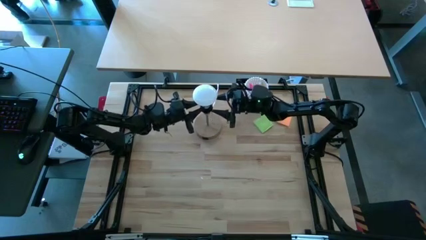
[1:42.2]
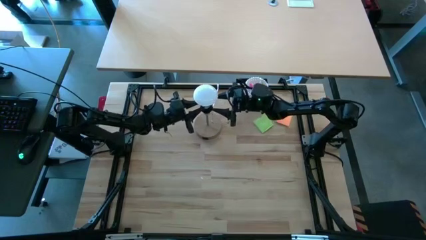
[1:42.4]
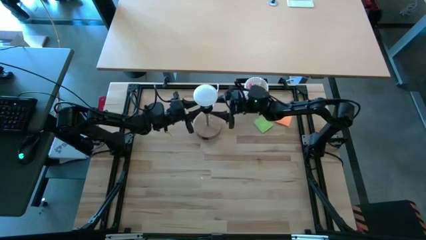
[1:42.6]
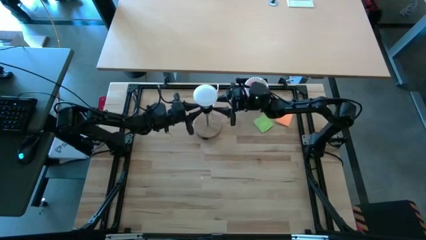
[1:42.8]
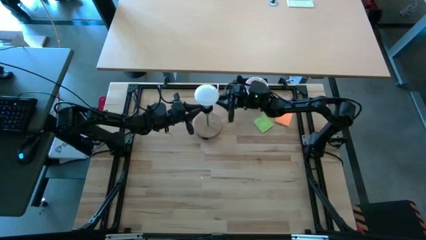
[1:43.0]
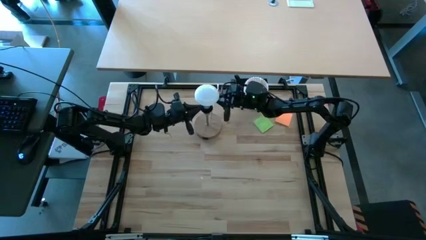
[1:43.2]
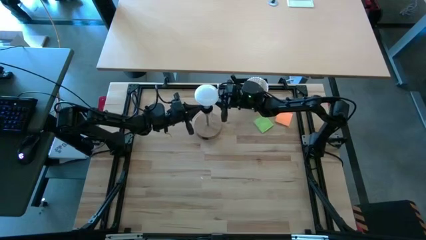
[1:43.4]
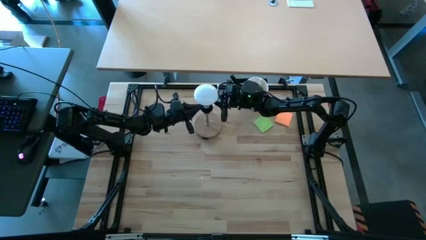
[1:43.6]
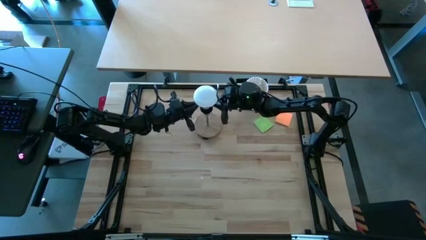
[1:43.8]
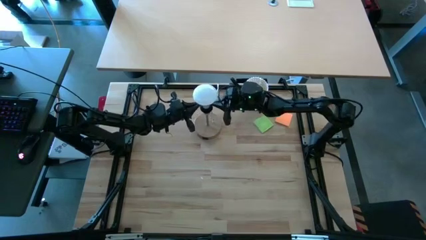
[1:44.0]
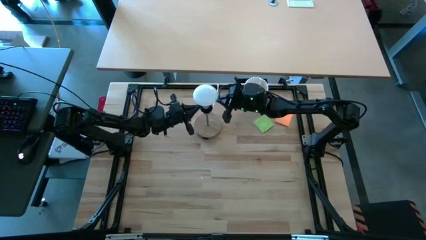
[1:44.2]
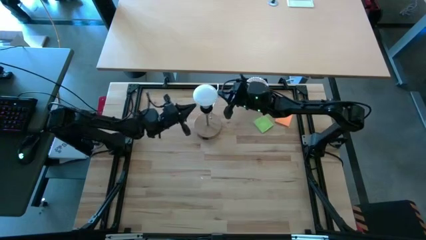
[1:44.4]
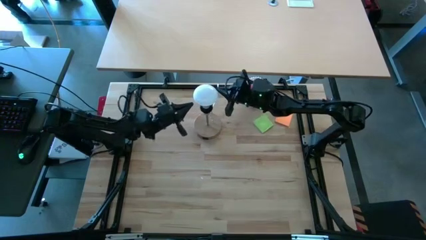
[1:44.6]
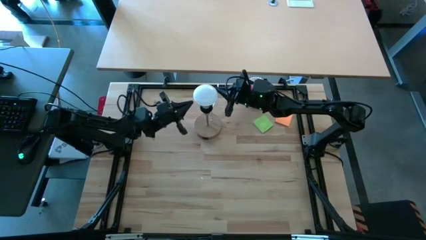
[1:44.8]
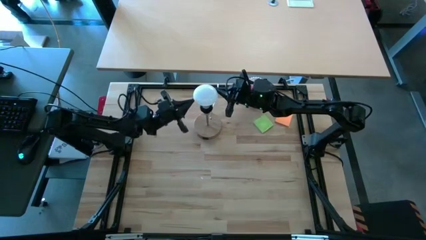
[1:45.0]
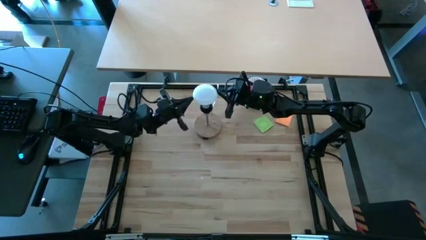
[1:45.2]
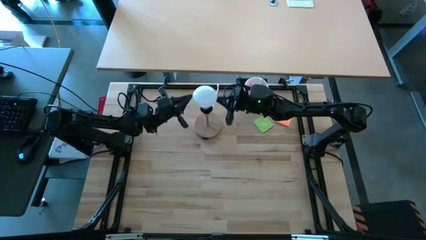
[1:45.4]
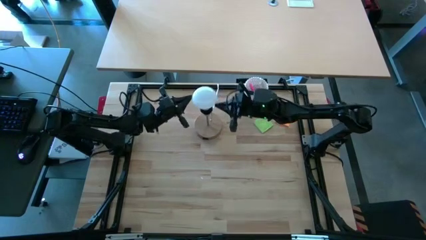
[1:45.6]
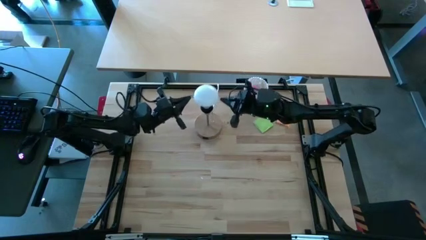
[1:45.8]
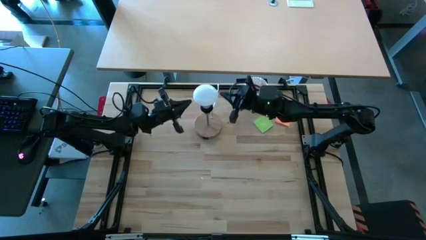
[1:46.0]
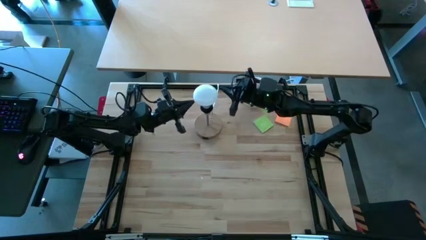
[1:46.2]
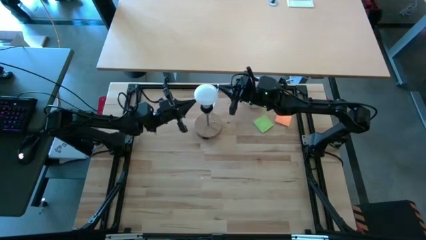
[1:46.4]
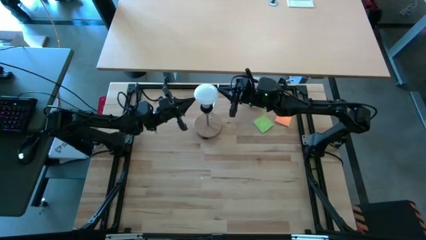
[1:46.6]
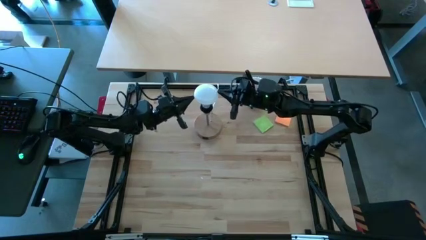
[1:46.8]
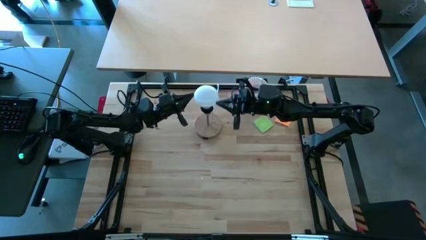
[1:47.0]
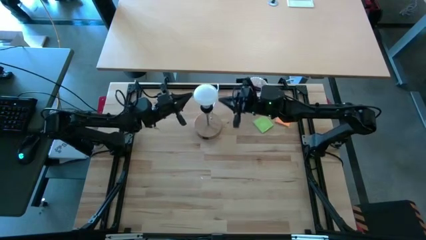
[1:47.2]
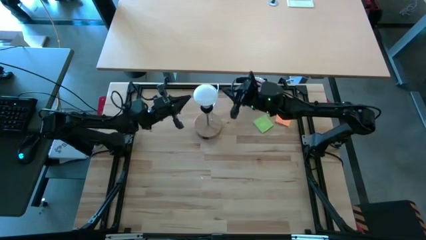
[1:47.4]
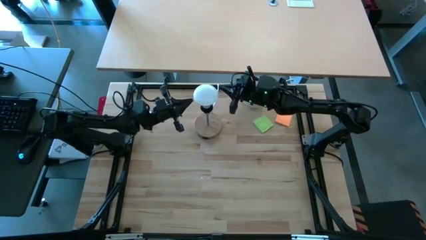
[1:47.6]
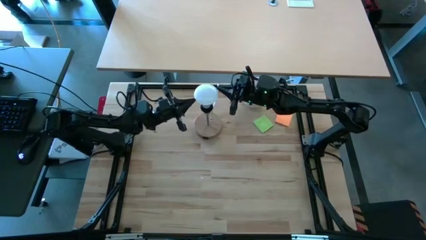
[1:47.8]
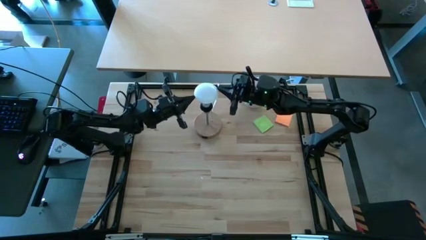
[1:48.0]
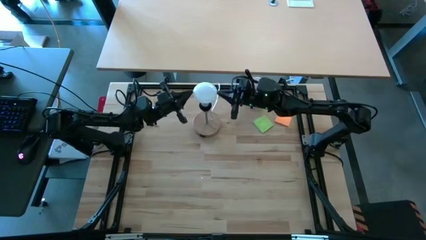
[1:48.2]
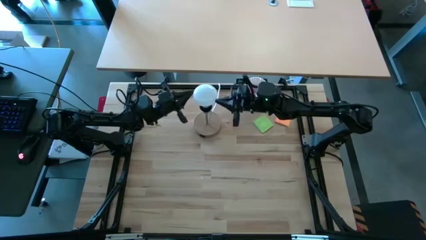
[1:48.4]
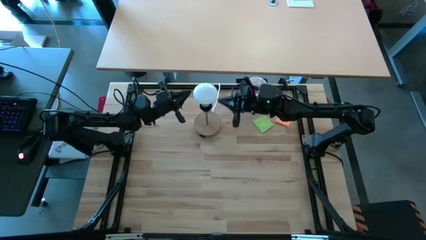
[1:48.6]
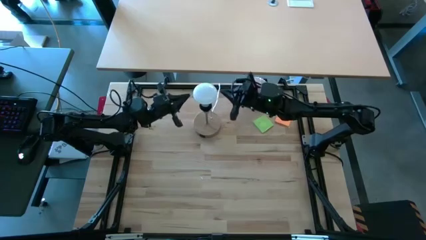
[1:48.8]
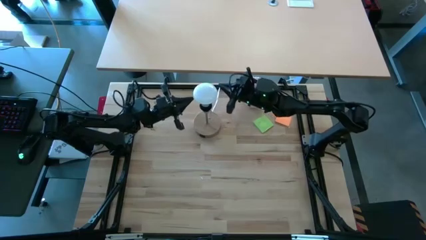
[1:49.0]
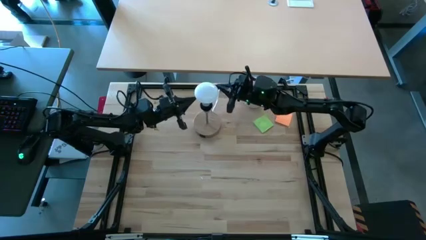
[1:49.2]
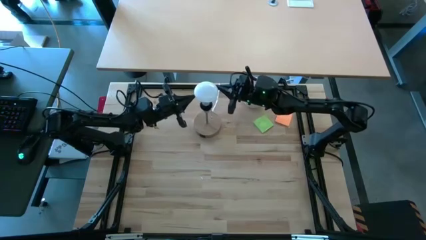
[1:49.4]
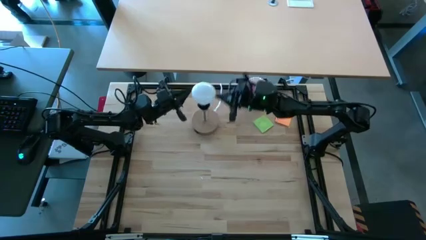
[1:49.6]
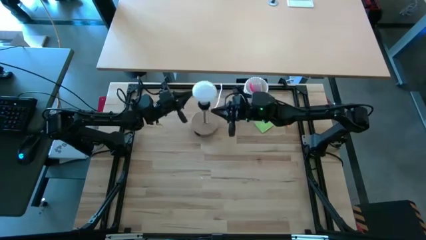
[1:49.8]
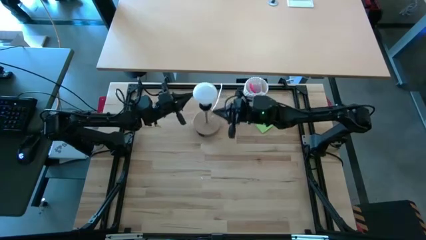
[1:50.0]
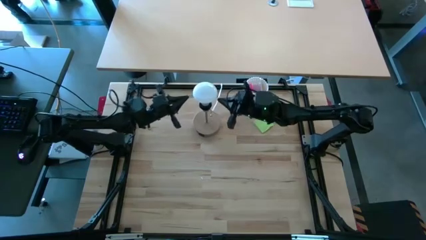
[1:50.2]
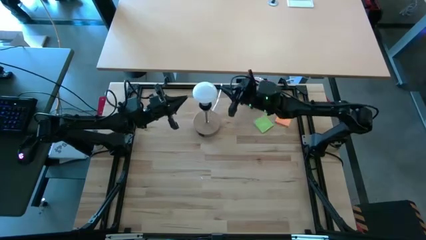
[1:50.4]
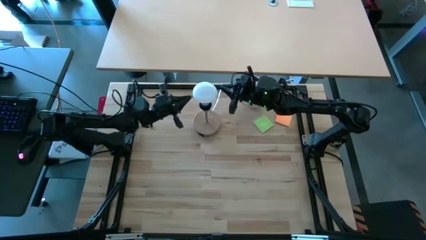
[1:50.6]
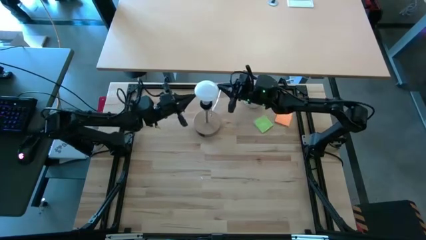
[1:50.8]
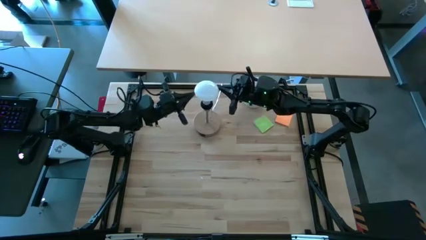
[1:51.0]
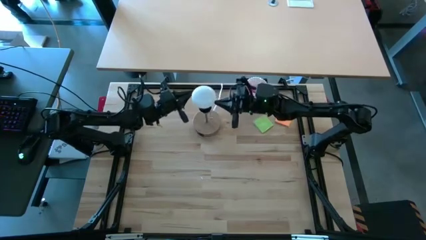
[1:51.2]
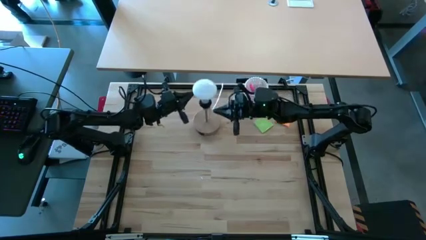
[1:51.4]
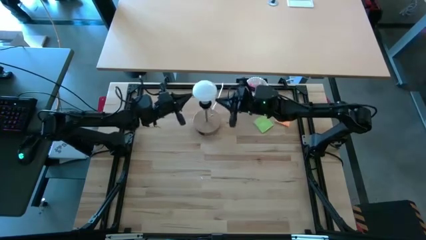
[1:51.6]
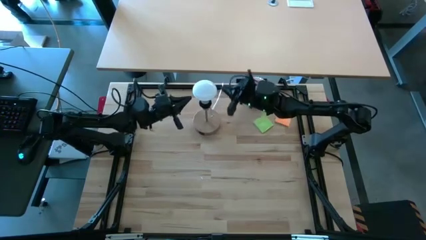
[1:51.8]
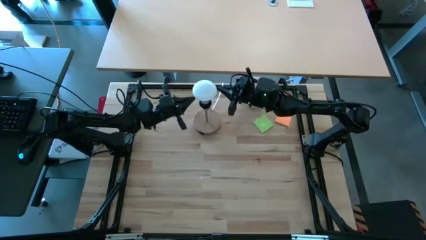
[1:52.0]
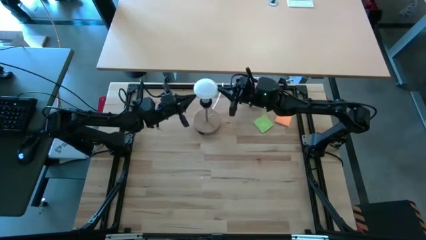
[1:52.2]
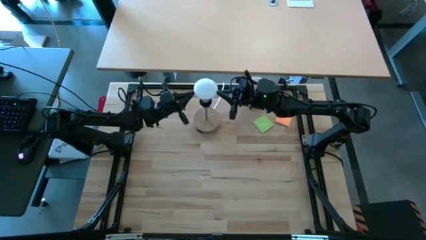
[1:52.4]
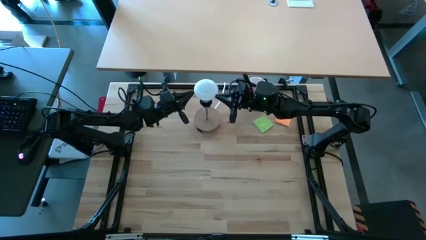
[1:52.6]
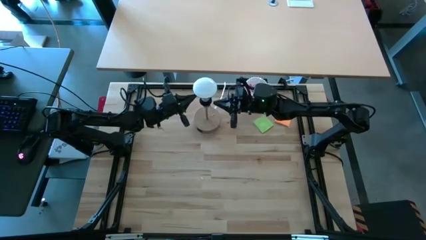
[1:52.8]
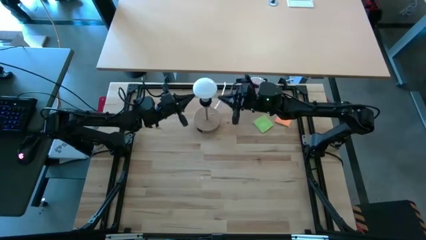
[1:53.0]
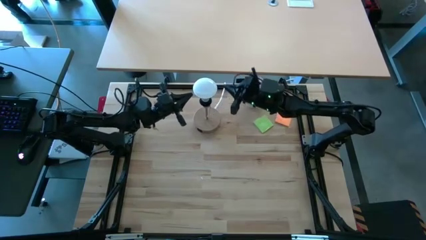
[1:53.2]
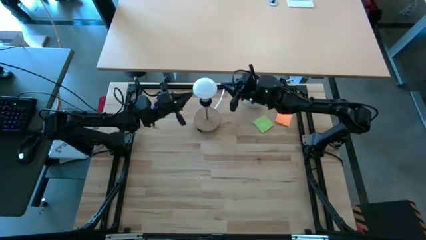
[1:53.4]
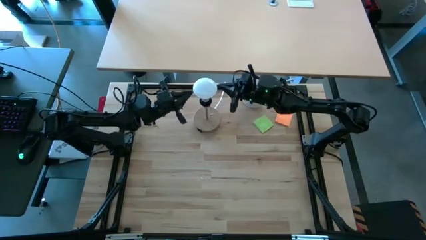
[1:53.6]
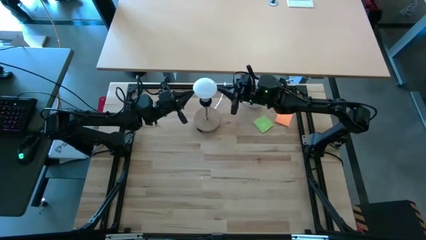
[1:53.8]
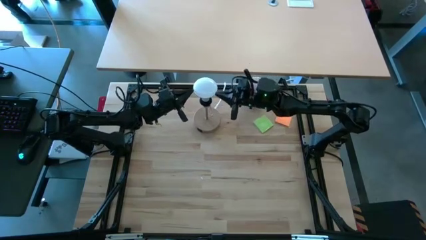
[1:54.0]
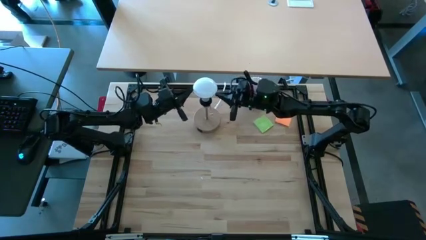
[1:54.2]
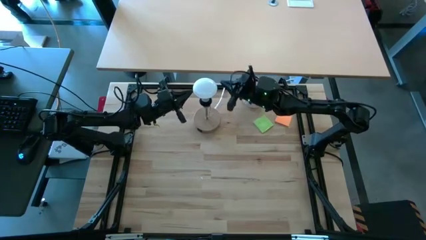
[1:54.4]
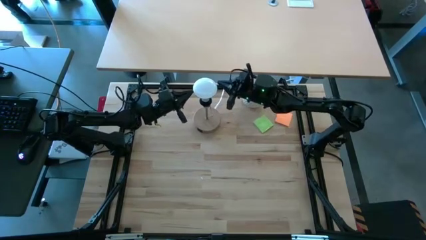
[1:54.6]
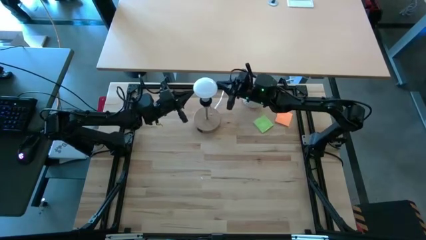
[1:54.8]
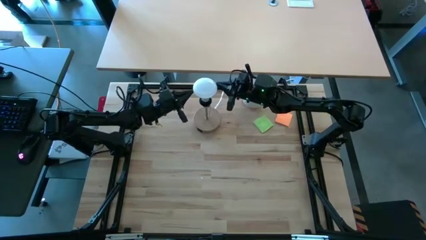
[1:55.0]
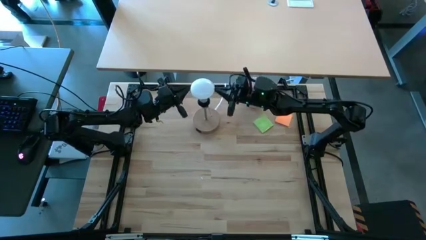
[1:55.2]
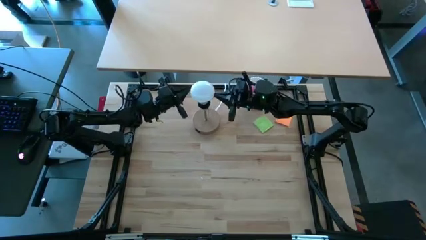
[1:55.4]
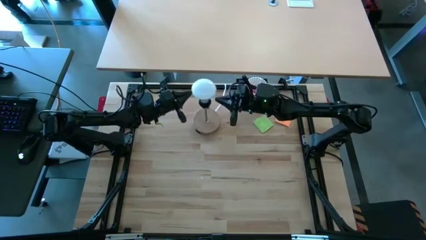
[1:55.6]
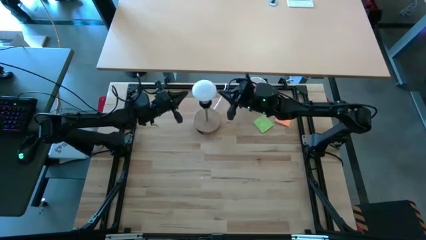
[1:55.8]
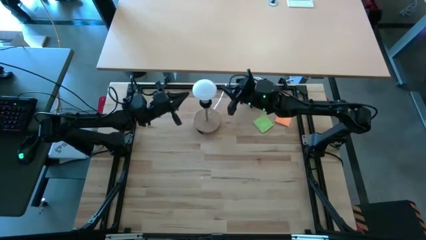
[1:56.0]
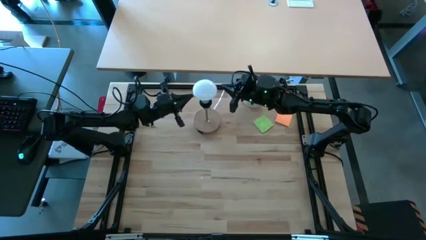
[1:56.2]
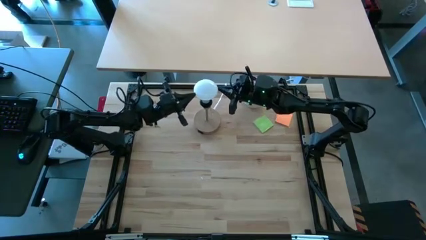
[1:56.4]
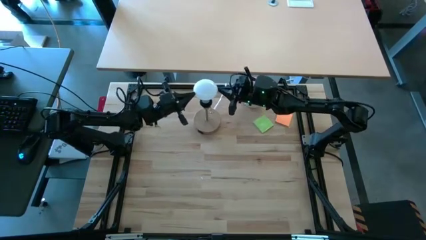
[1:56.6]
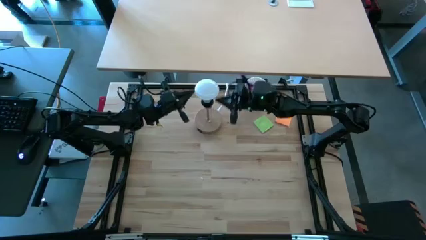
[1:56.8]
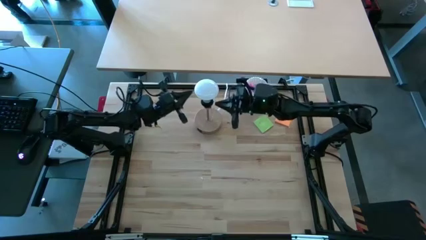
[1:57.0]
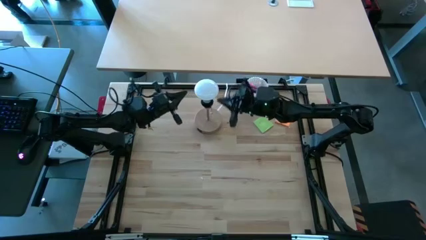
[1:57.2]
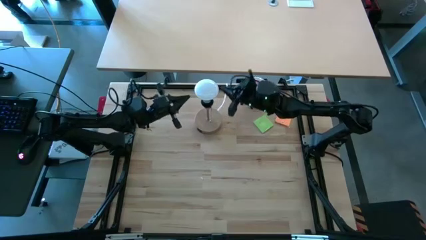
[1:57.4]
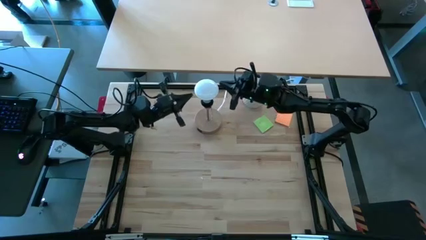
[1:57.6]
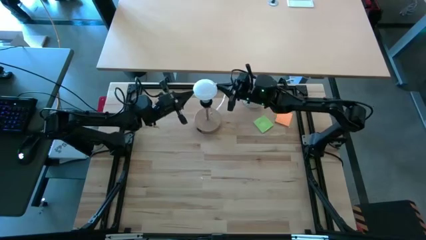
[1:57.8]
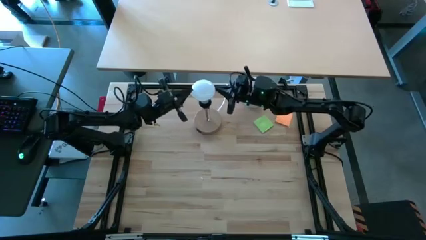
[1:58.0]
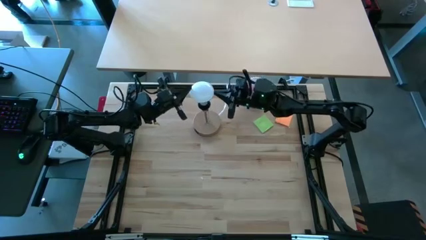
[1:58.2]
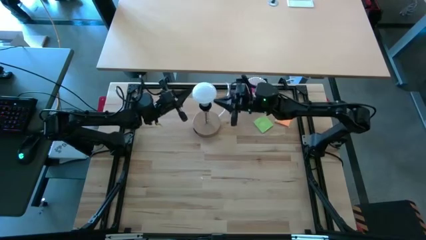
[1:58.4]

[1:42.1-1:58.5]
Task: Screw lightbulb
Insert the white lightbulb into the brown lamp
